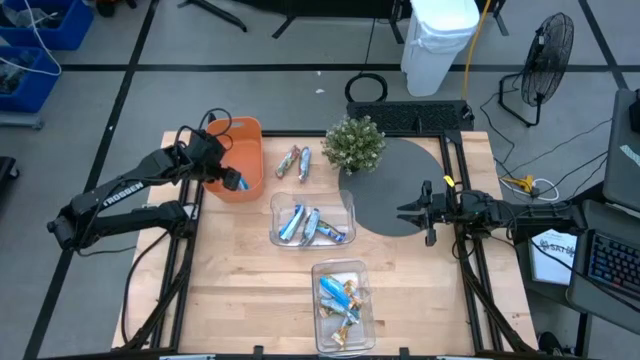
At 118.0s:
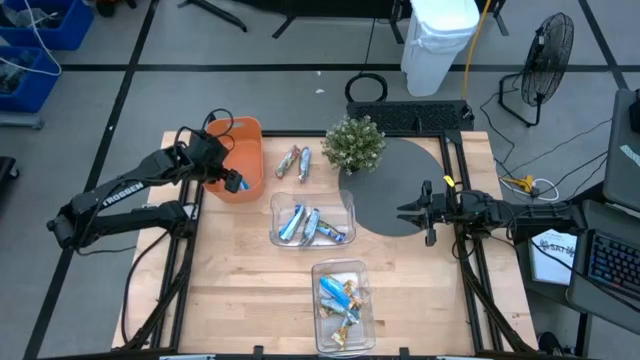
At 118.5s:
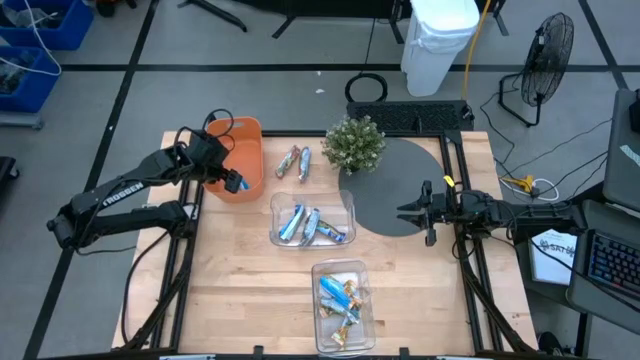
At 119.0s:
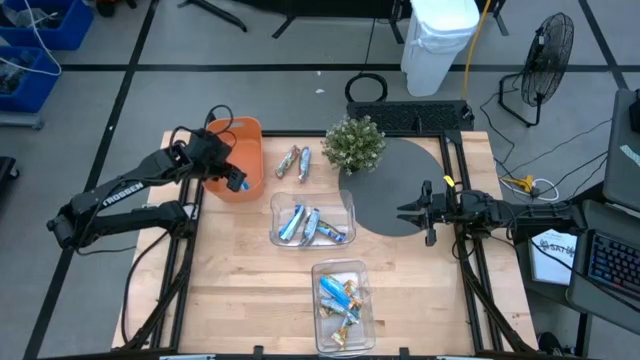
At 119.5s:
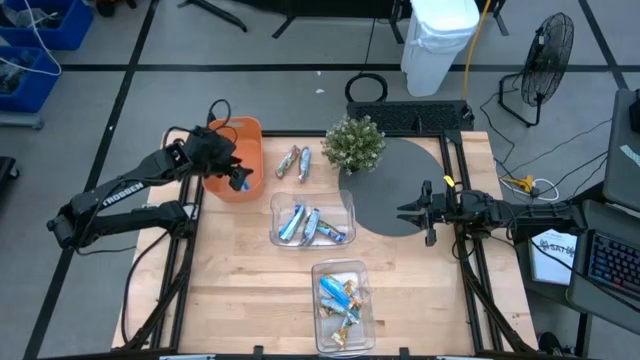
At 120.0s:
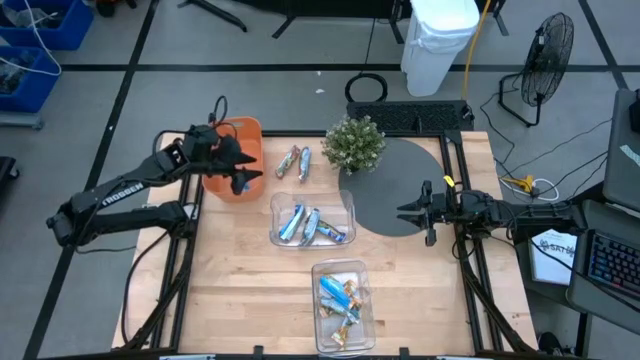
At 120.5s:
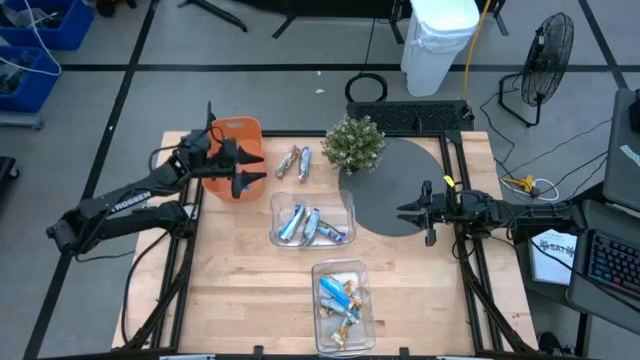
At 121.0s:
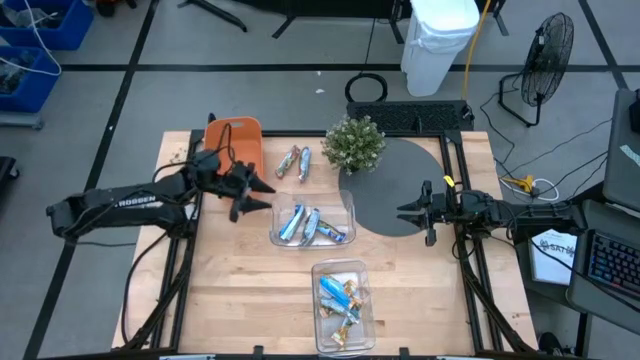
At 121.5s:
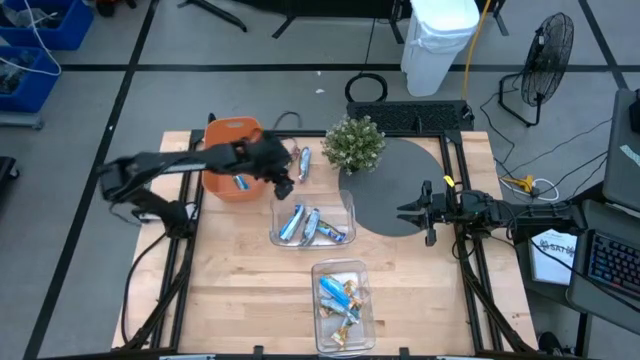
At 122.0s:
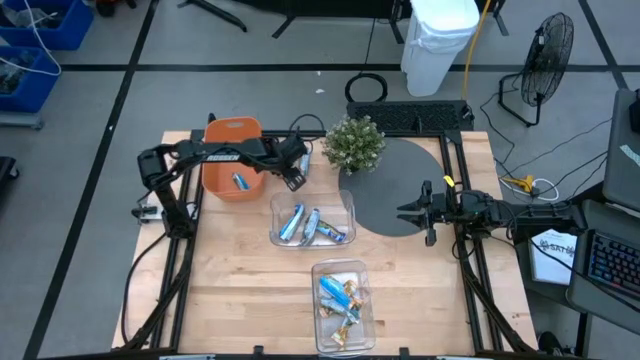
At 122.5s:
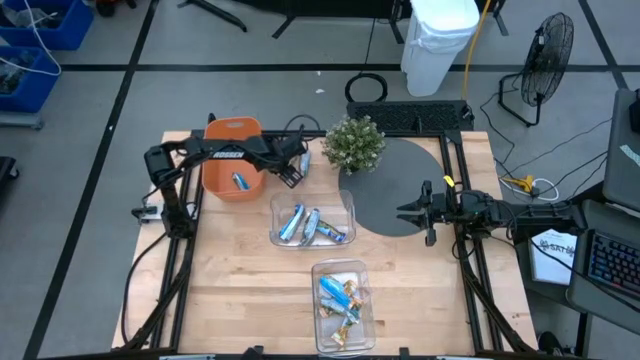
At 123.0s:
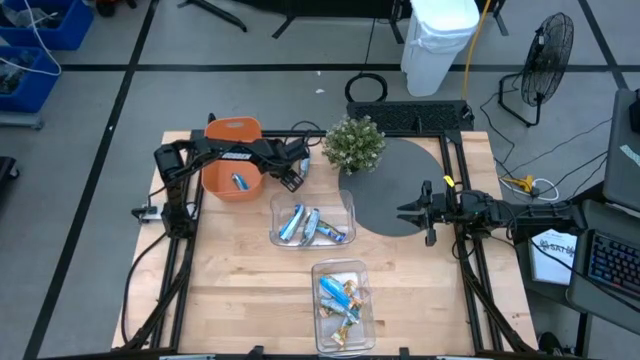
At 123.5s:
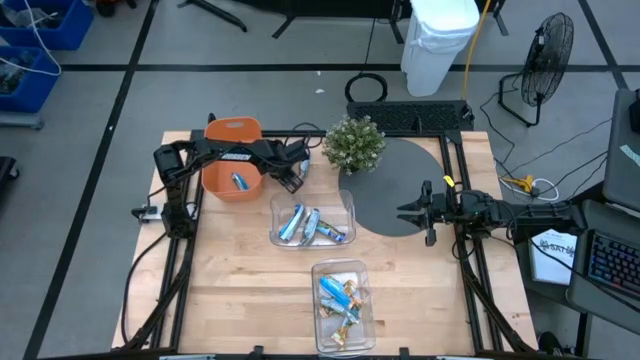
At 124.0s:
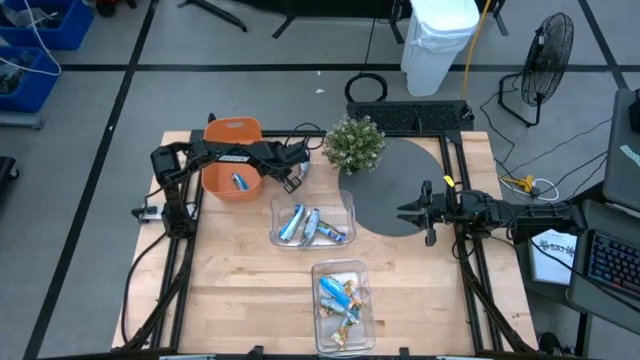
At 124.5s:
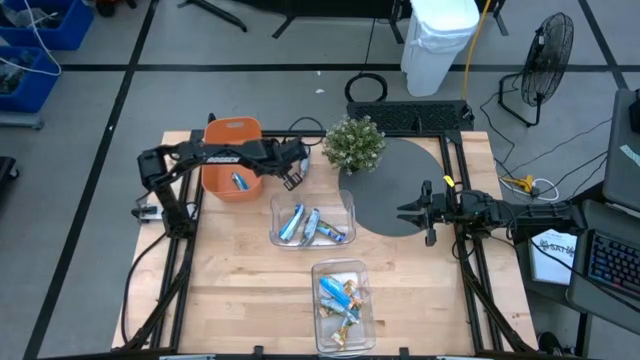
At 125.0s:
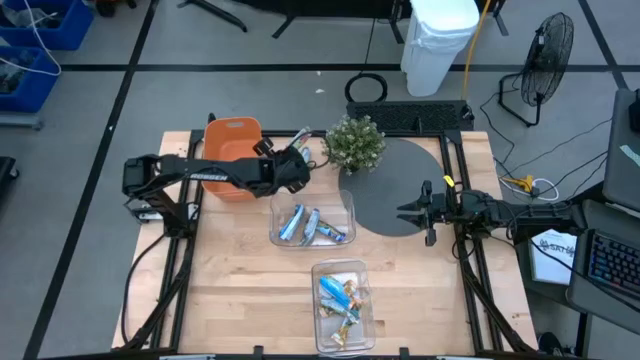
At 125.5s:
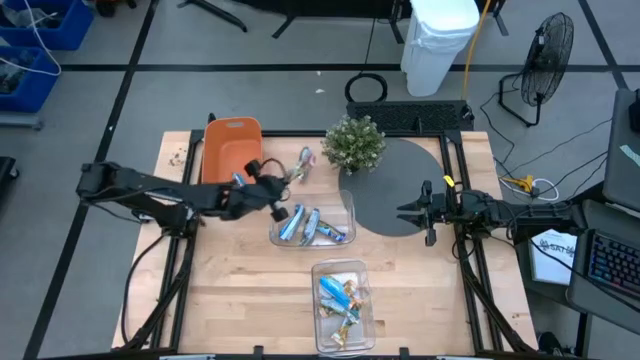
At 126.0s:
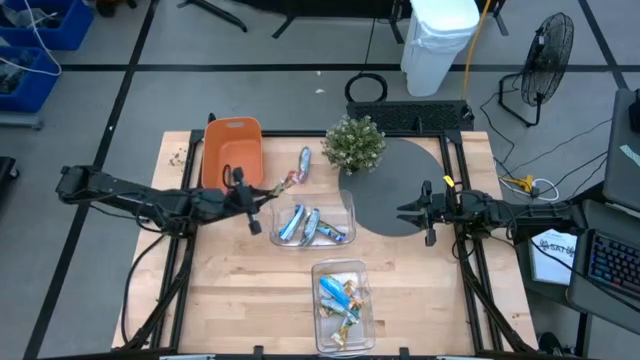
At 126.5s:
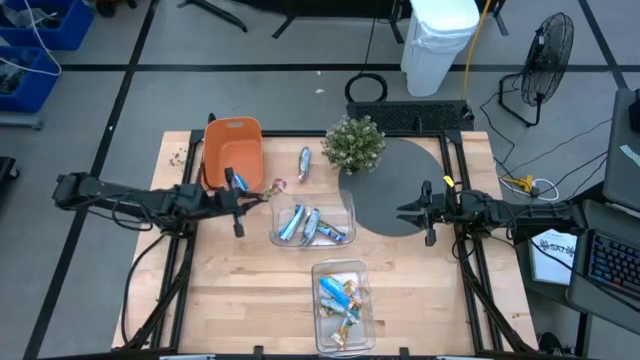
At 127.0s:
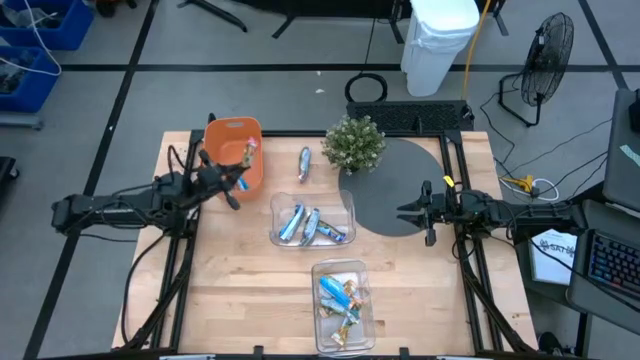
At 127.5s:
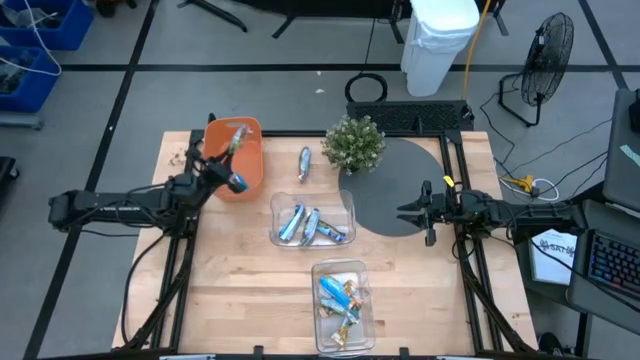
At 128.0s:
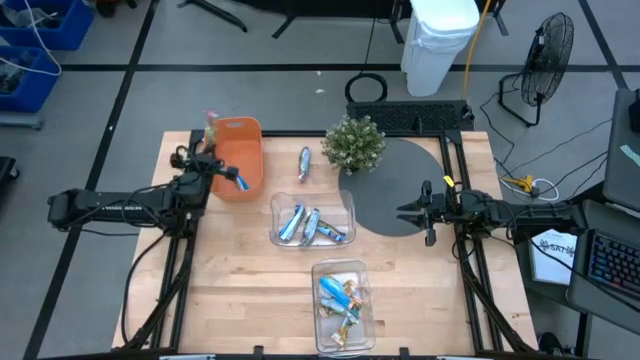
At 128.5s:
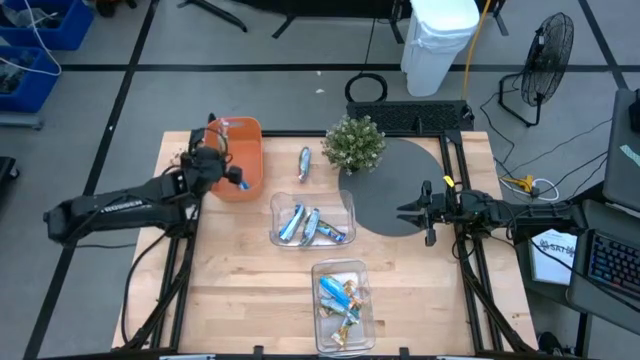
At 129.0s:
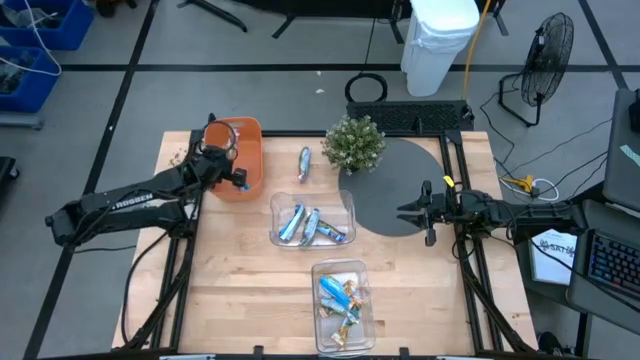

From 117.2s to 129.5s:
Task: Pick and place Granola Bars by type
Put the red granola bar into the orange bin

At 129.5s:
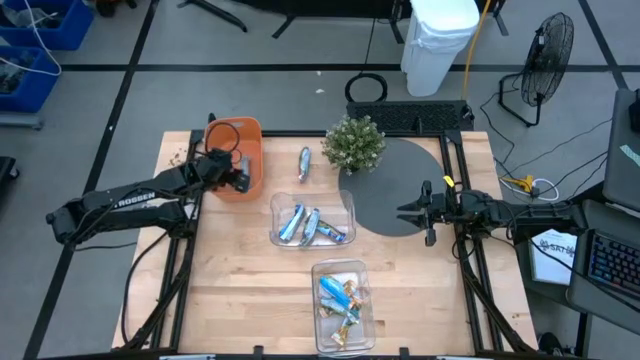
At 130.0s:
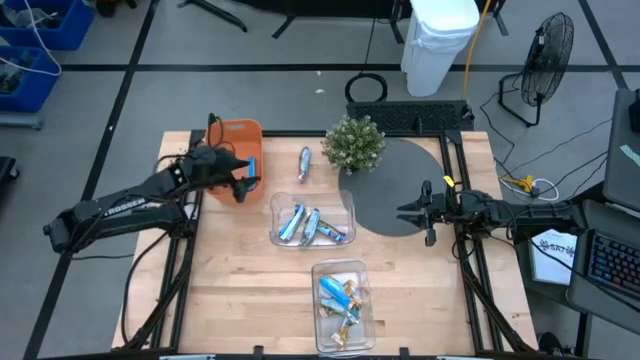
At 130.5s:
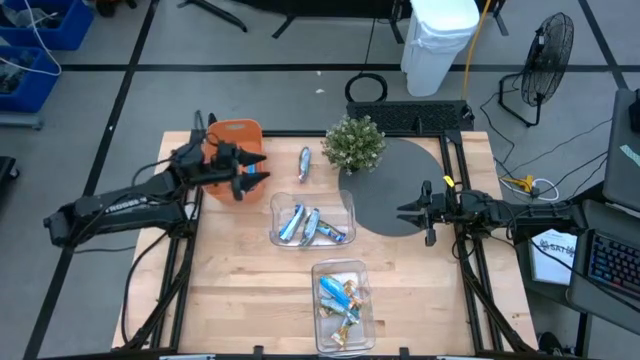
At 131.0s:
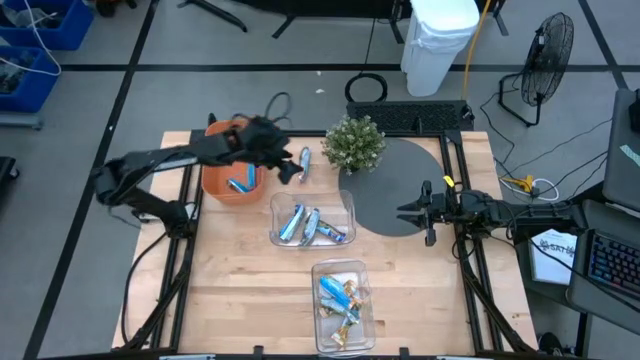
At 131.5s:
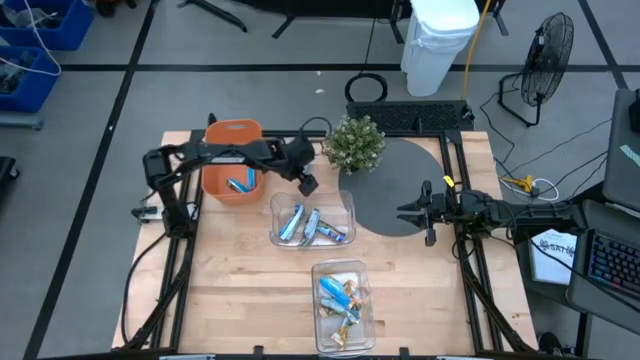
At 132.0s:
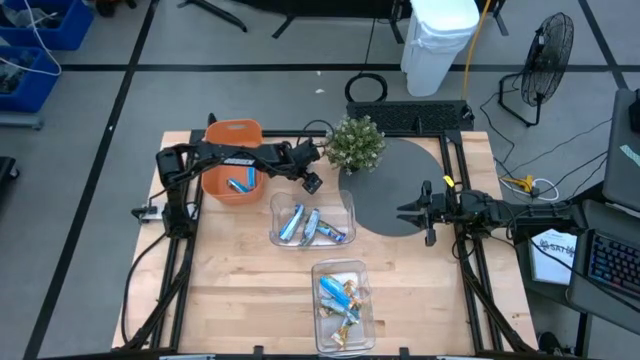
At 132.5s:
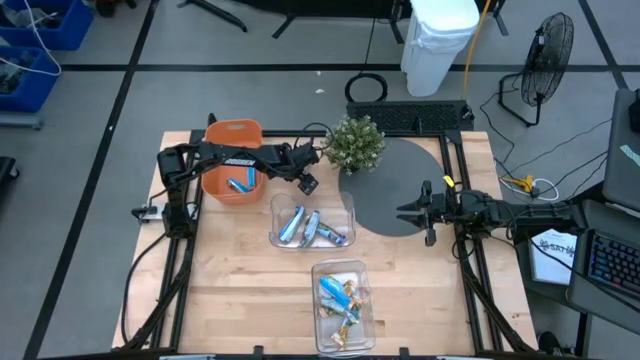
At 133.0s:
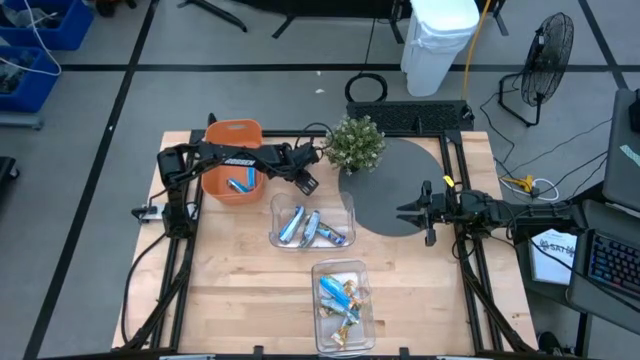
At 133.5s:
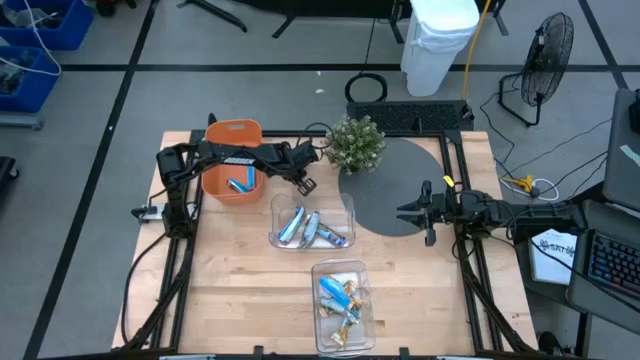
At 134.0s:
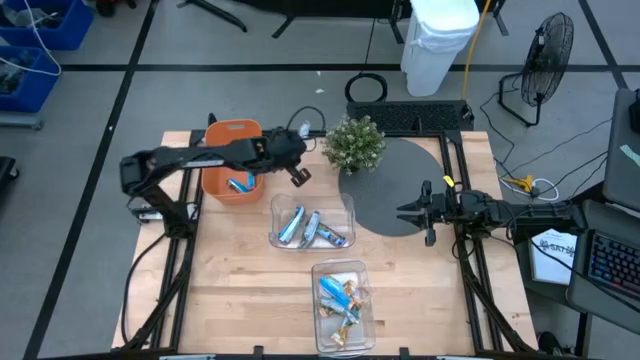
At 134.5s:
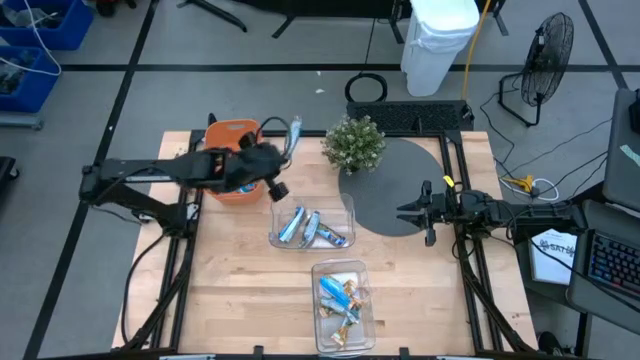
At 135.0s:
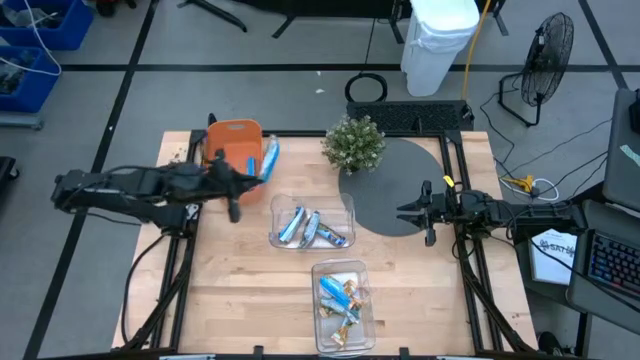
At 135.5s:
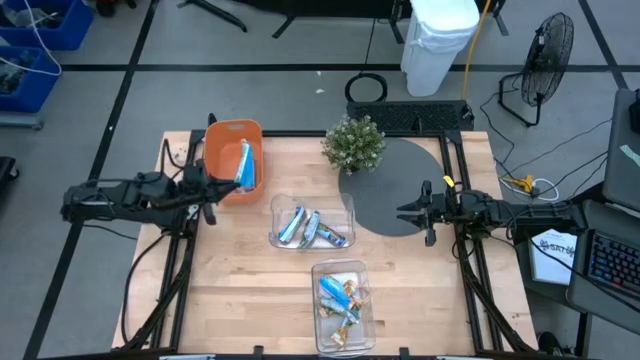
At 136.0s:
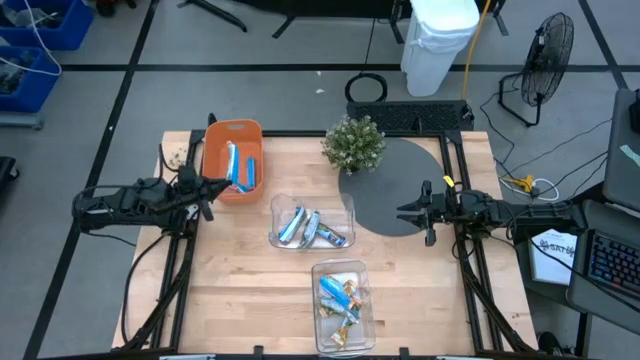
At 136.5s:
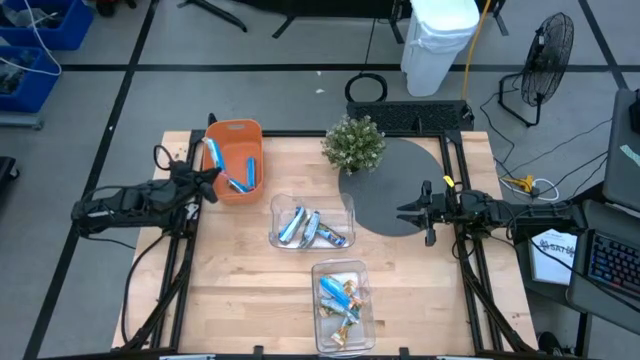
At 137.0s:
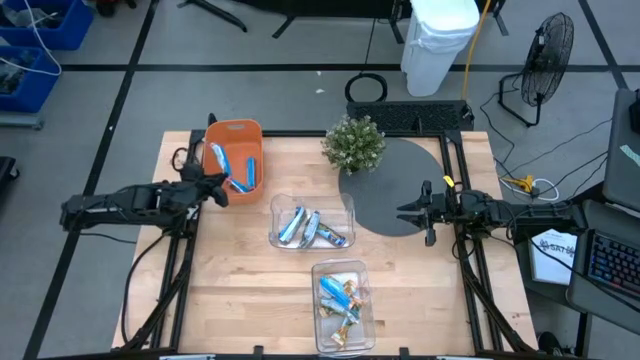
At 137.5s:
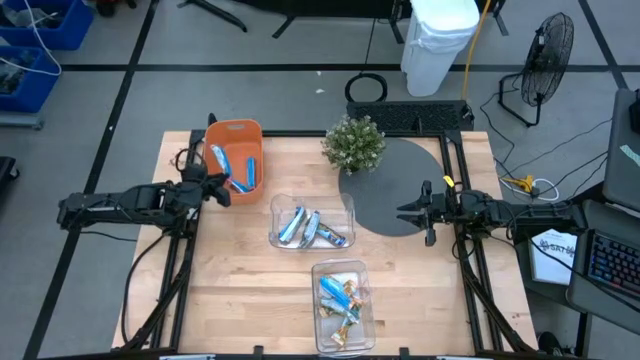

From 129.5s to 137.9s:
Put the red granola bar into the orange bin

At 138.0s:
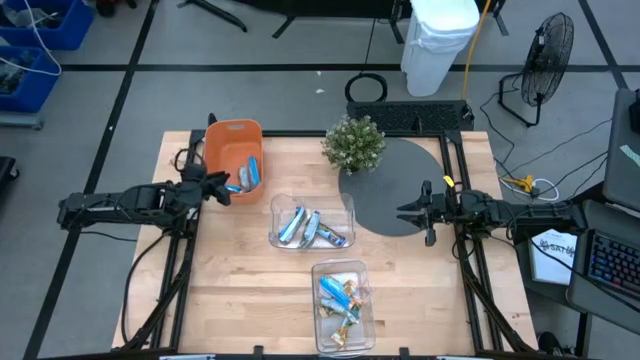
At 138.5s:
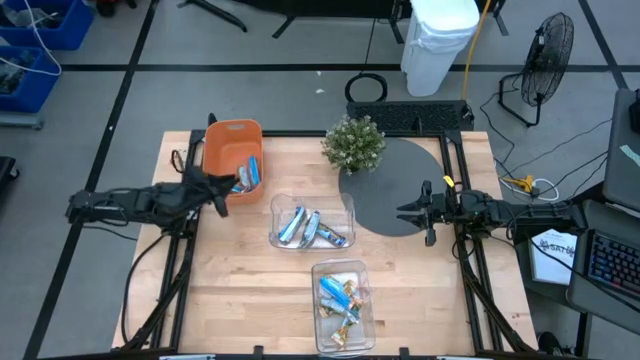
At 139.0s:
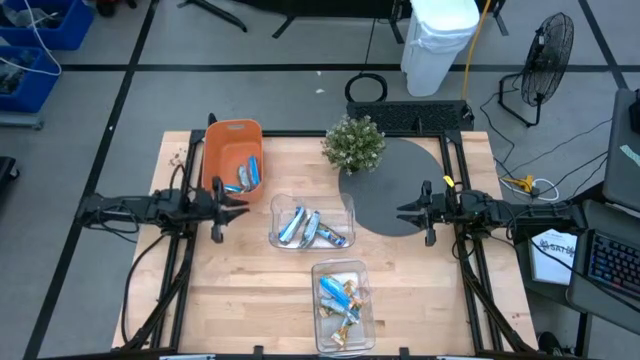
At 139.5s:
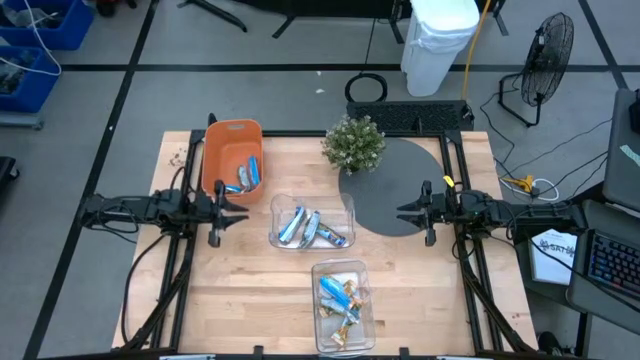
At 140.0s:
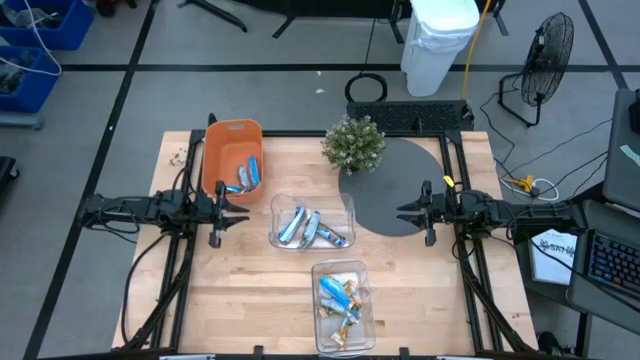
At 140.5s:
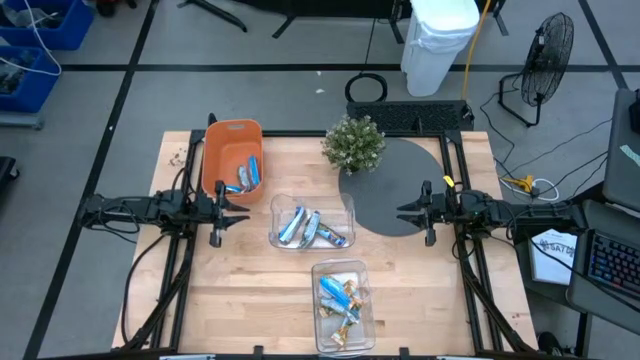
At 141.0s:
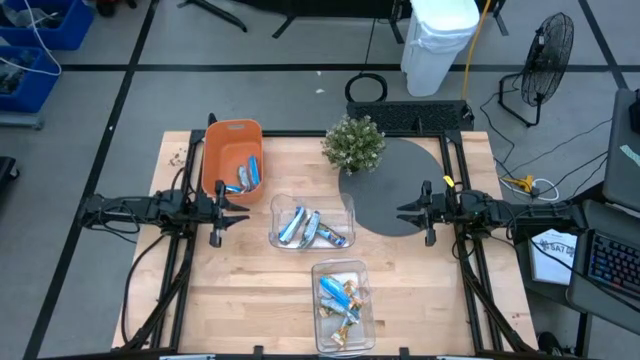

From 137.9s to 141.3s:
Return to Home Position
